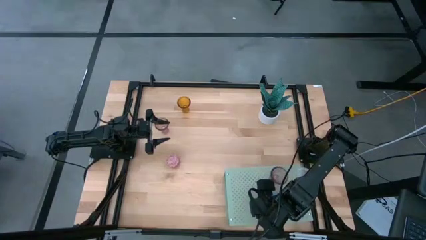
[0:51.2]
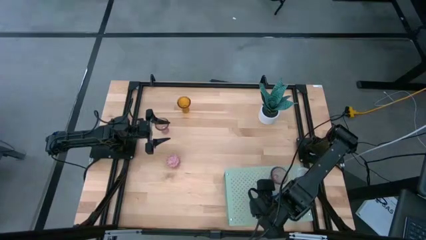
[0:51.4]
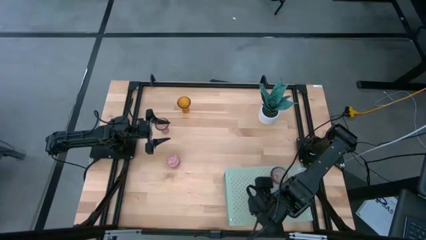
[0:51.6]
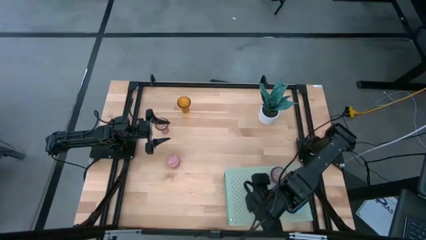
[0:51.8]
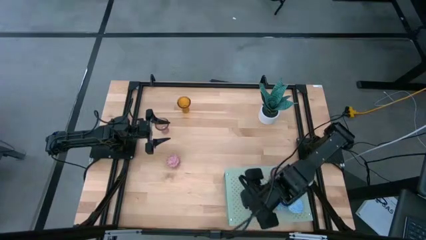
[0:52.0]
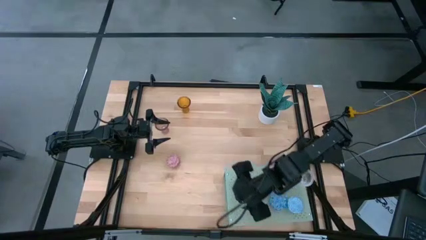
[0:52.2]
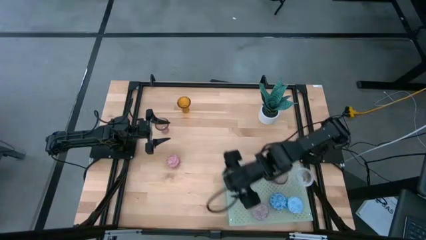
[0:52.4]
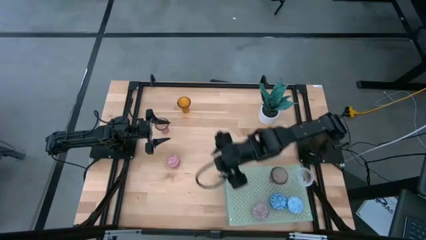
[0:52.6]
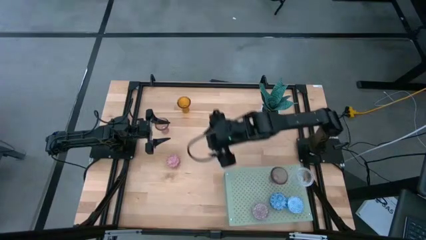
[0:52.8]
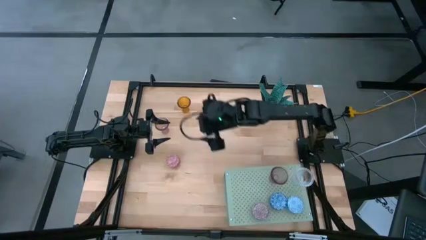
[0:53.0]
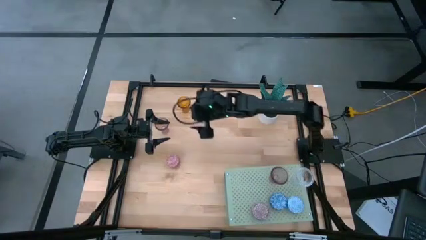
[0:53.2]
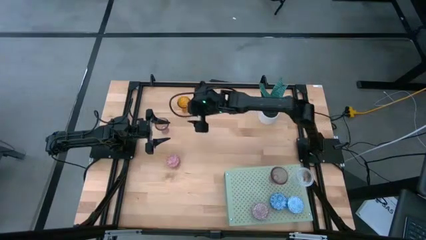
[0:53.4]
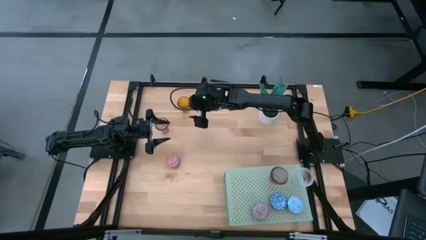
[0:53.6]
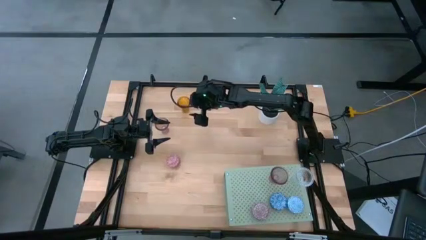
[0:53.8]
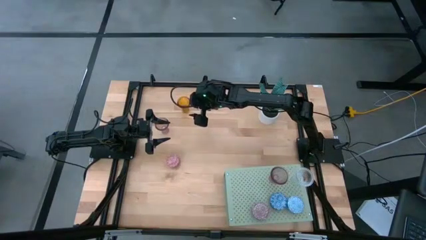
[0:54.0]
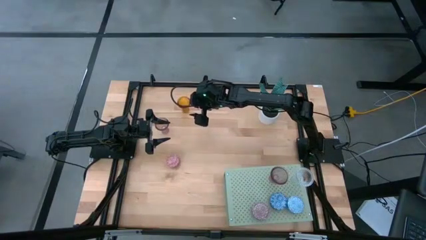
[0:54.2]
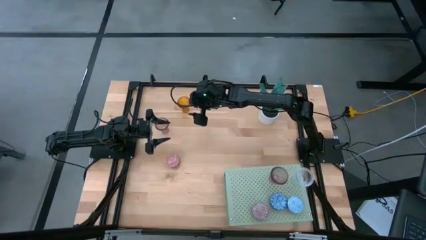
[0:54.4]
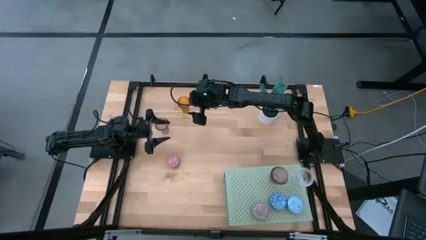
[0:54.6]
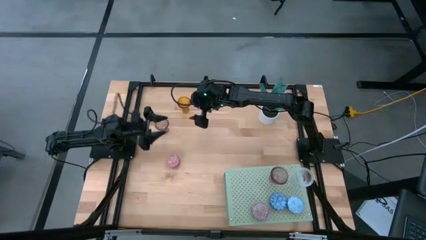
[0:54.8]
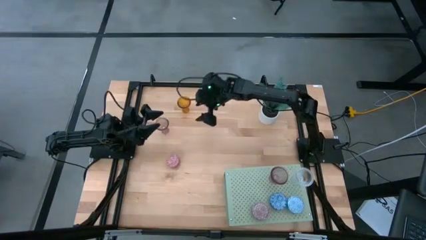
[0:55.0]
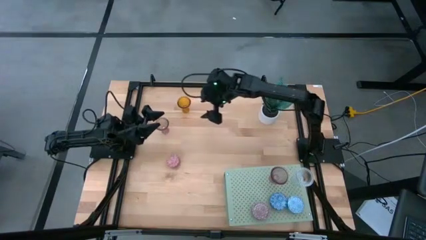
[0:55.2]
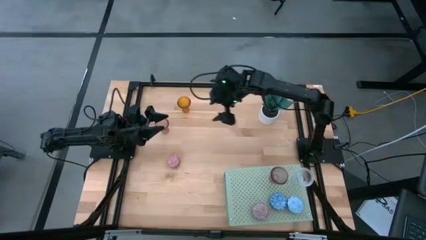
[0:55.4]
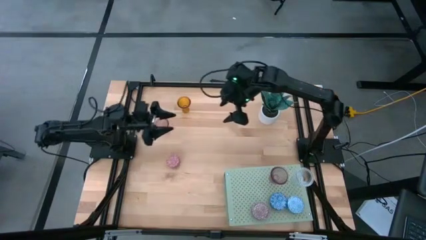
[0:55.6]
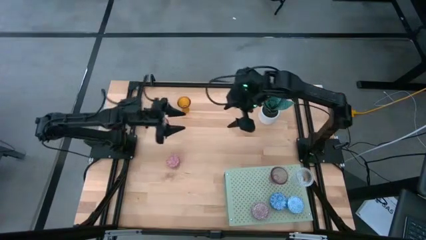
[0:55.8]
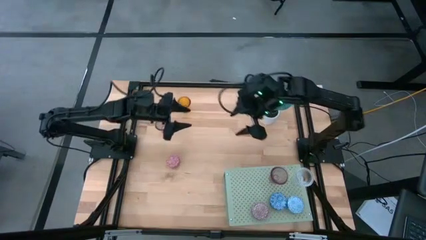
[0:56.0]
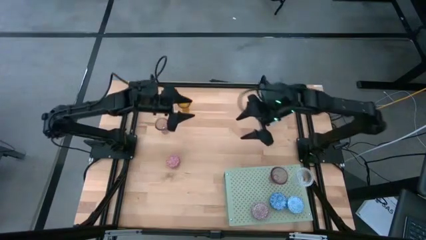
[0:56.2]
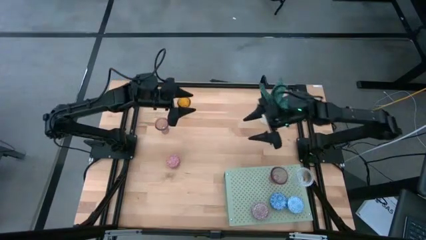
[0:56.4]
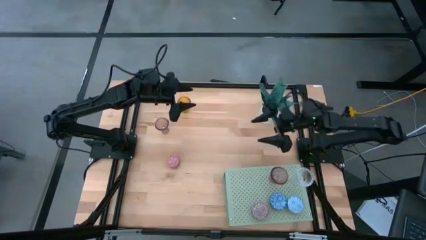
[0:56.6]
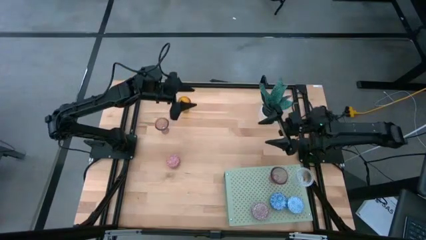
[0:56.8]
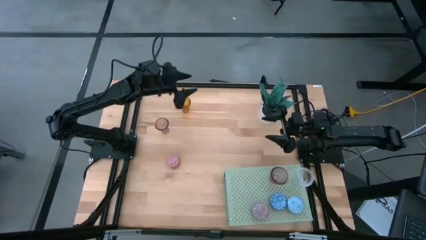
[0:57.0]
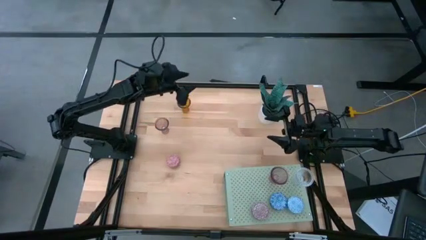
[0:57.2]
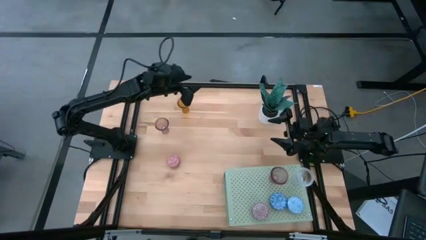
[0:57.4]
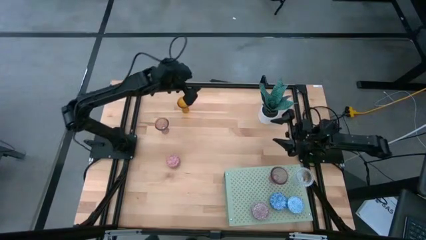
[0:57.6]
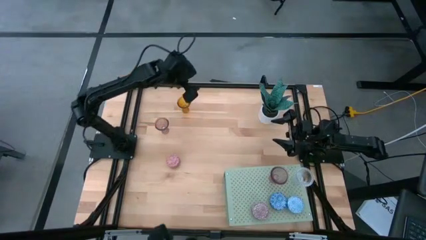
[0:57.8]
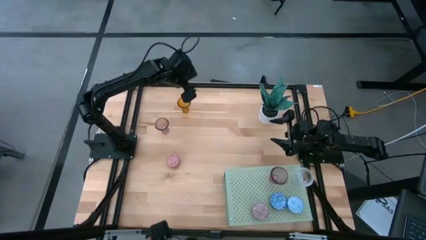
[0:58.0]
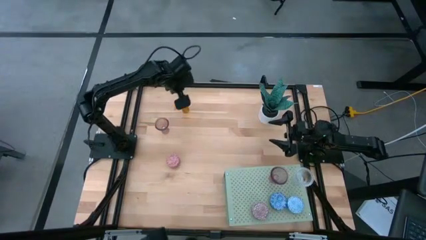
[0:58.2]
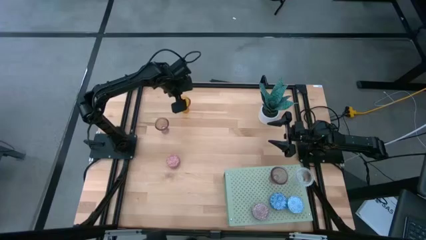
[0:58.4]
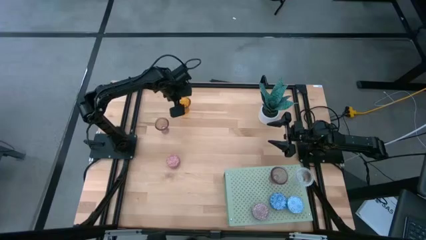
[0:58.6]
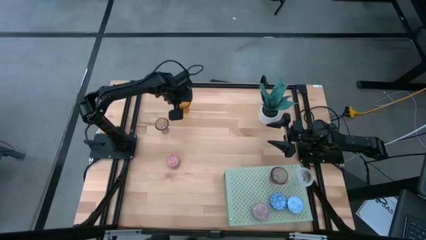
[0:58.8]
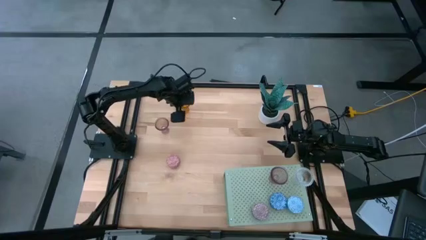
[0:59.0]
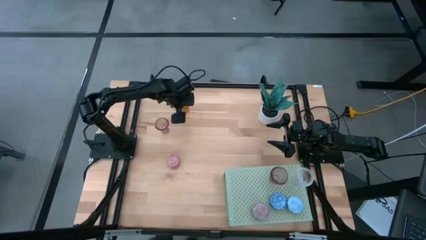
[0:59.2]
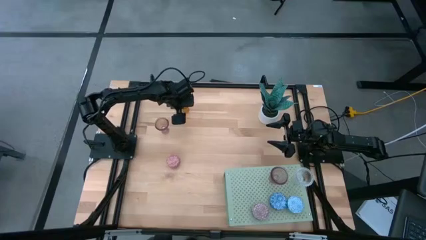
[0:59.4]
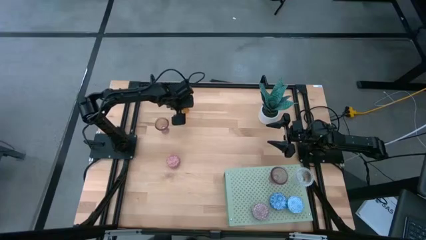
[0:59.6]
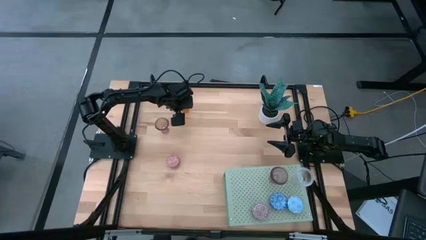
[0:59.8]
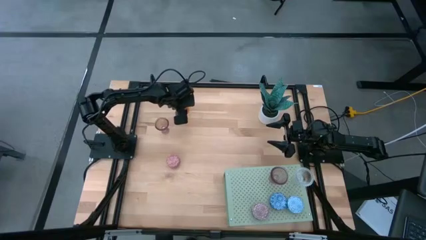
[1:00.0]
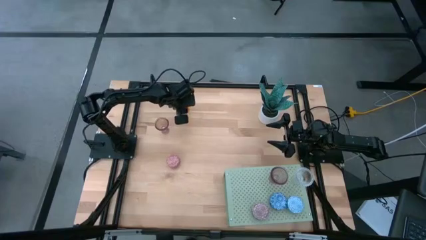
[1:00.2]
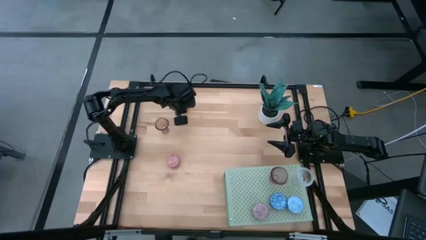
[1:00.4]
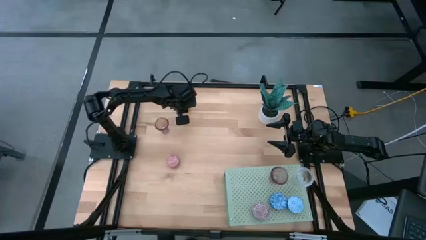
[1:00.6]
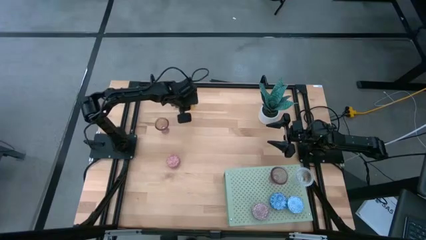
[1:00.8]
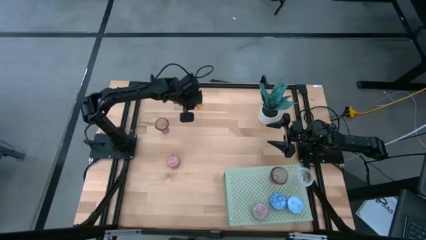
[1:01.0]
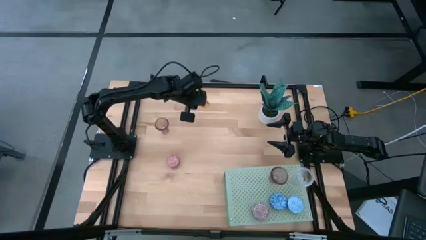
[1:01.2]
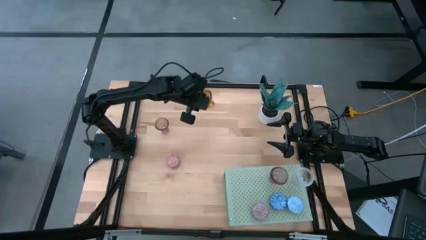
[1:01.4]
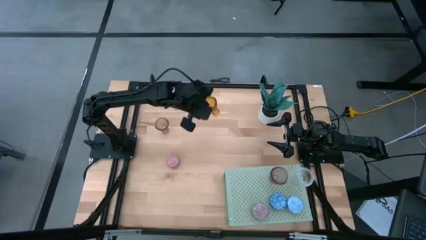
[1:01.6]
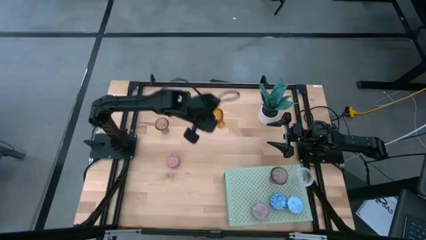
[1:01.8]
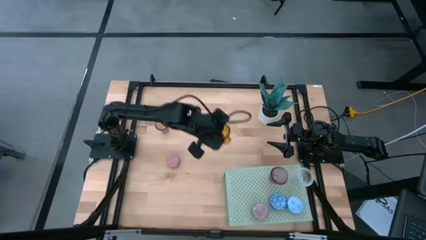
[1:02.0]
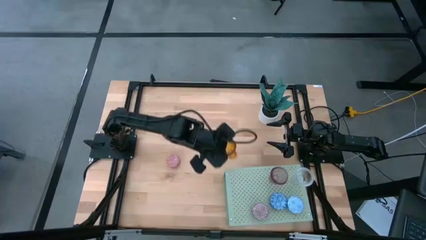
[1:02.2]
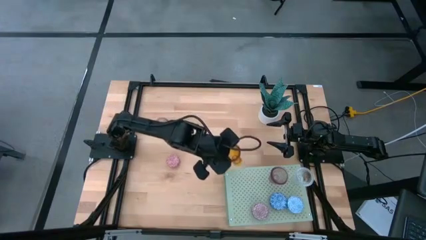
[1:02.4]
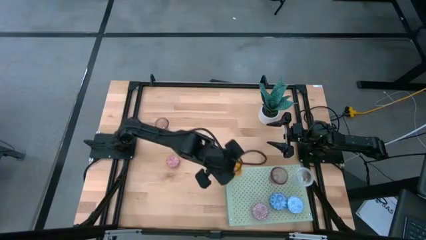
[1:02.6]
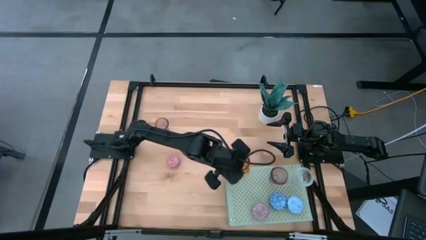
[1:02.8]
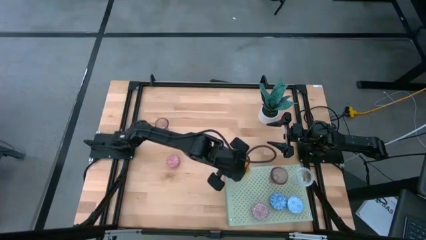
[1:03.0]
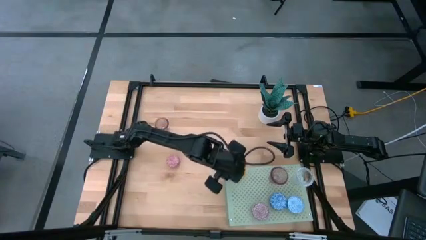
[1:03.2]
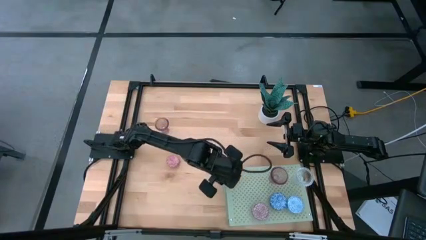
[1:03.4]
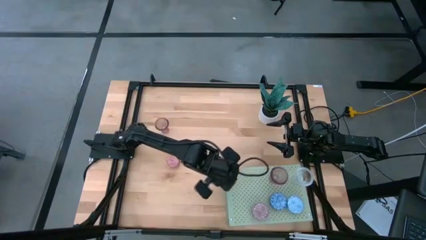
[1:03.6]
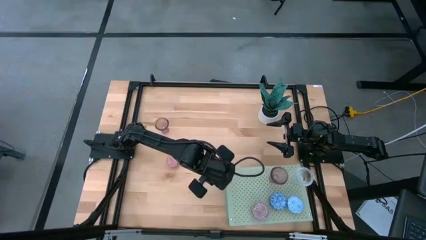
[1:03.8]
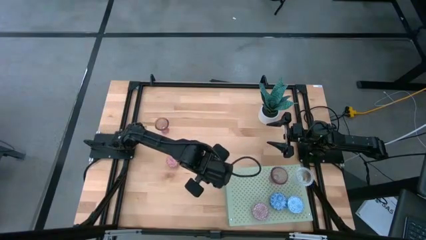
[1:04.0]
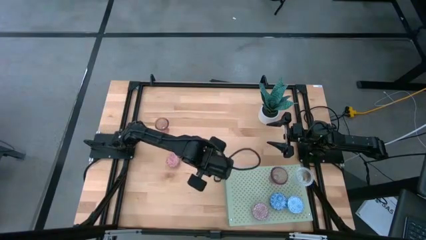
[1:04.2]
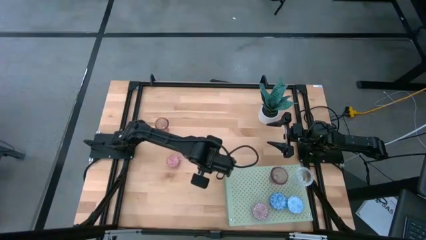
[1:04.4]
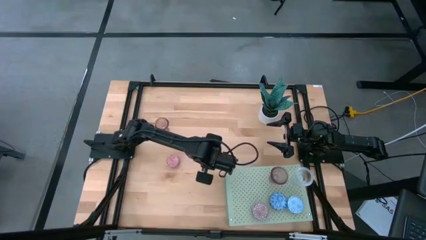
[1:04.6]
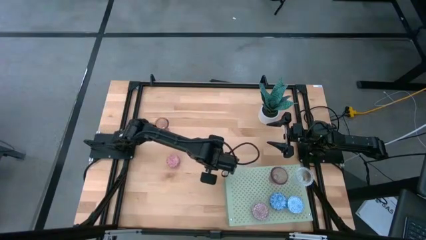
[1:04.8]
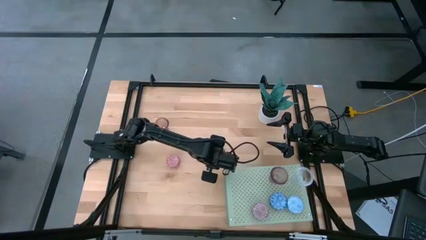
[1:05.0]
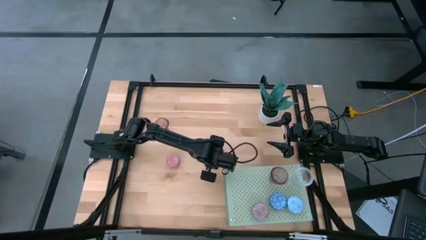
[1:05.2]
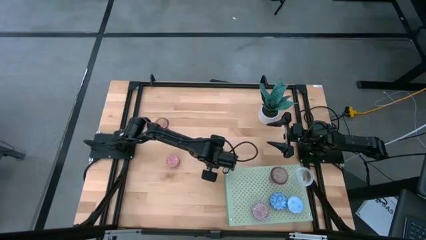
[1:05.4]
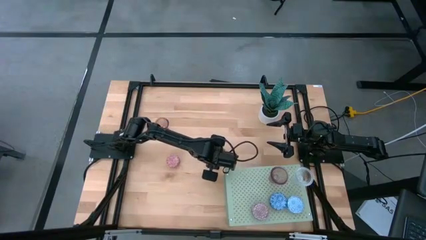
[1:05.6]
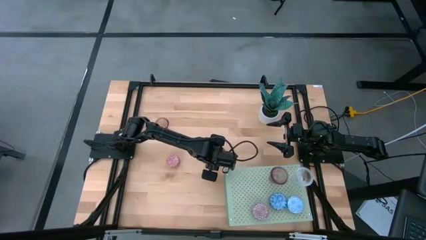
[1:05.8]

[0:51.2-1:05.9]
Task: Pick & Place candle stick holders
Move the brown glass candle holder to the center of the table

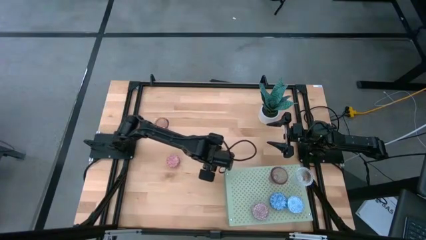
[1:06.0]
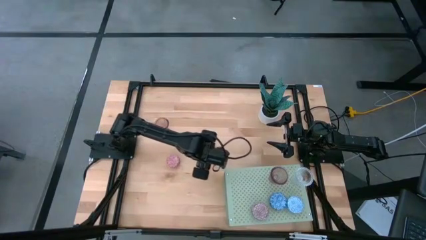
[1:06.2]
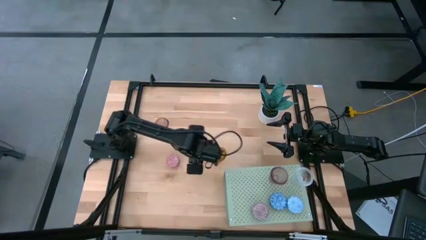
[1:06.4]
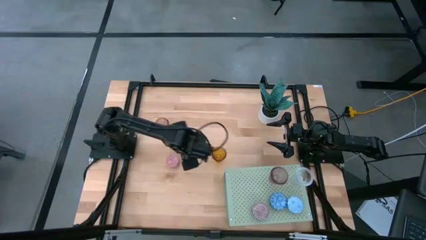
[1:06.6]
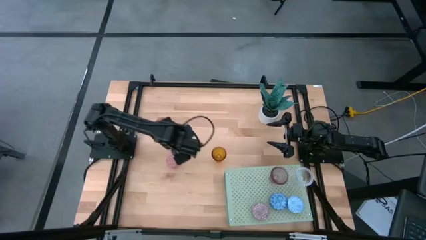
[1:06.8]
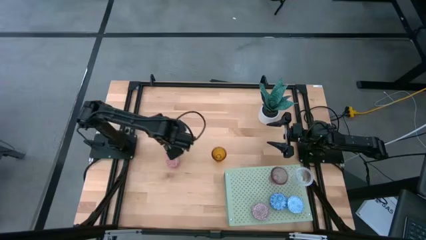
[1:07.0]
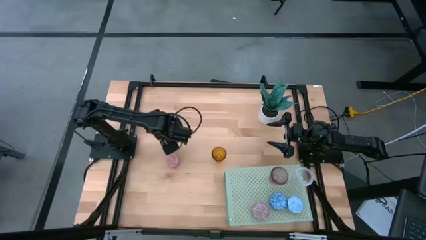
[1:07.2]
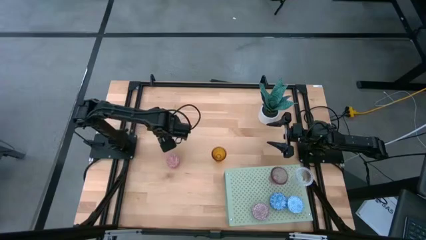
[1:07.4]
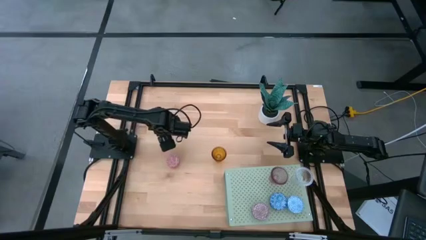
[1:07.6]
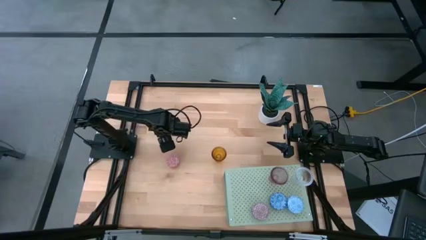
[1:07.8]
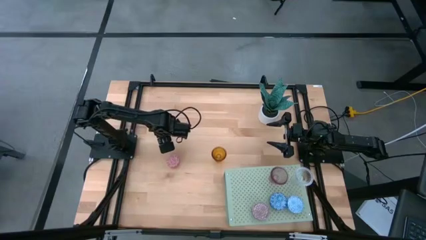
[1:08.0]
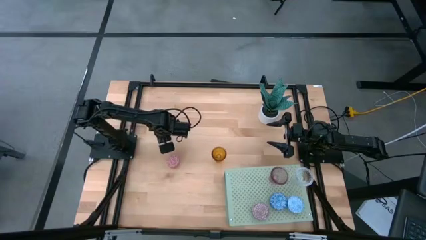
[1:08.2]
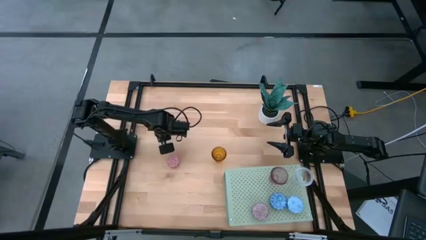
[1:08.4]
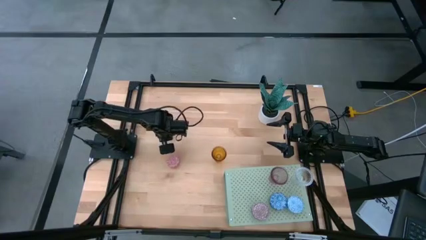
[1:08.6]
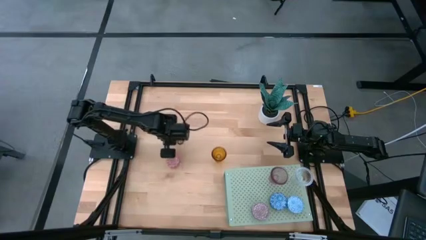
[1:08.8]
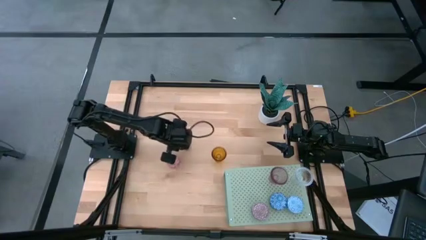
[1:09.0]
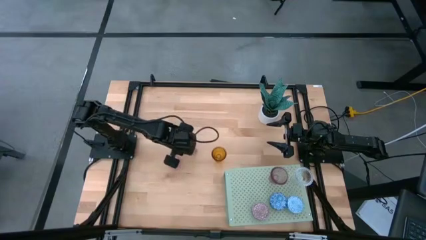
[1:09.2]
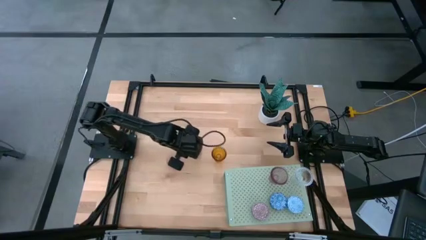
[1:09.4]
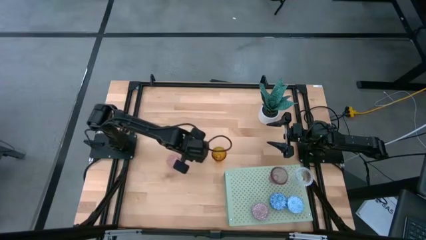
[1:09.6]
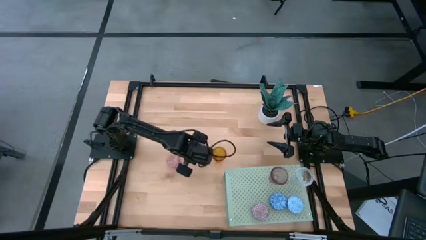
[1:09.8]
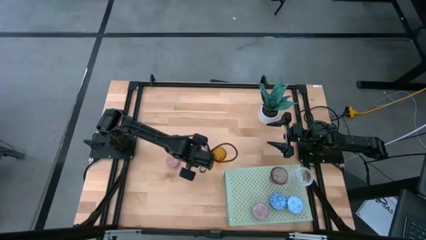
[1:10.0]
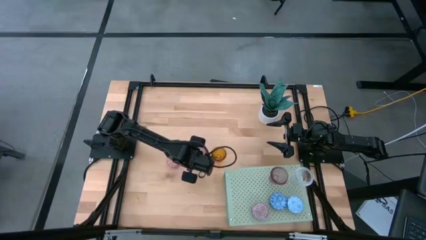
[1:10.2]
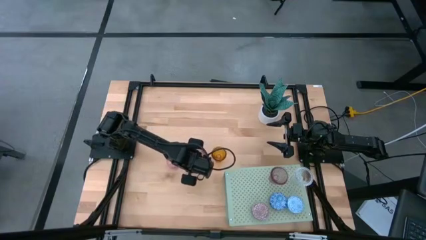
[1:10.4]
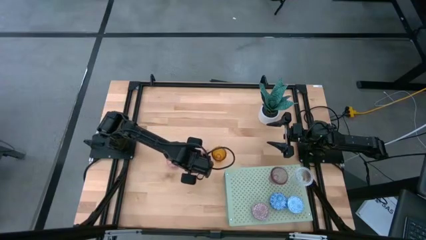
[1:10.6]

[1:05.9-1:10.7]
Put the pink glass candle holder on the shelf
